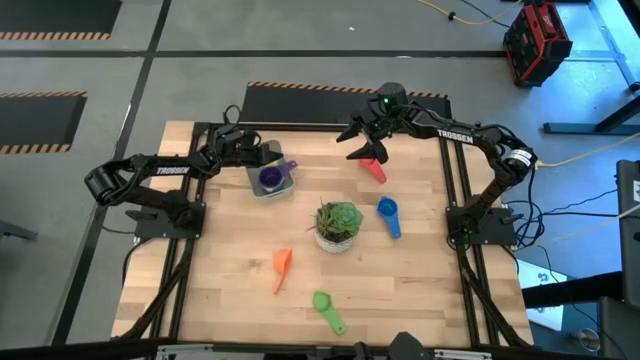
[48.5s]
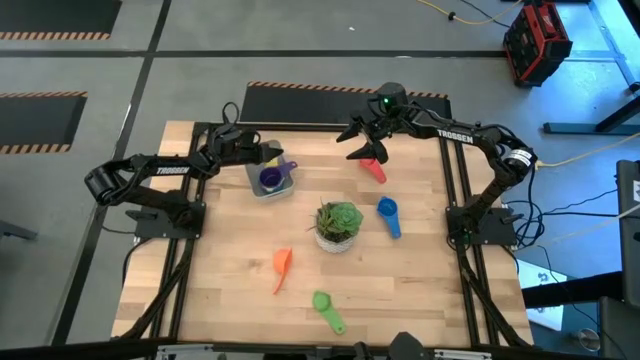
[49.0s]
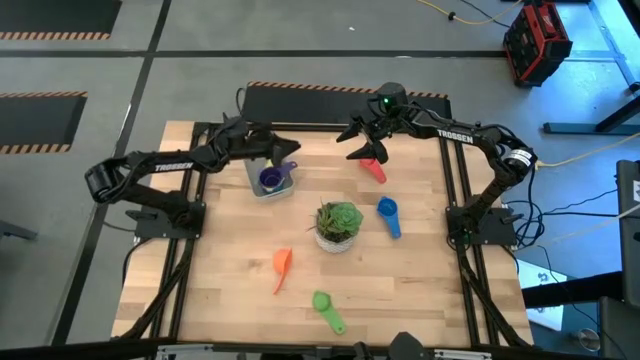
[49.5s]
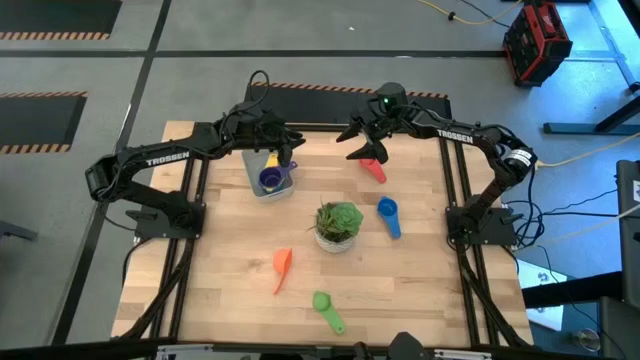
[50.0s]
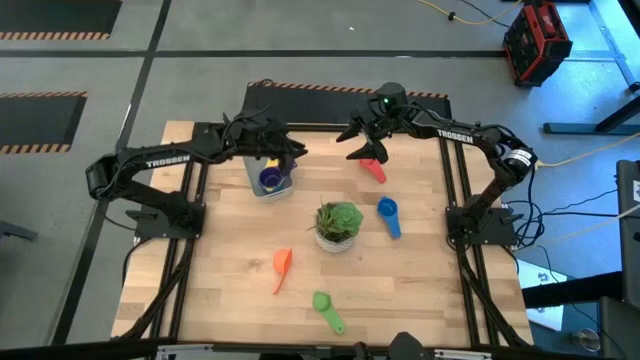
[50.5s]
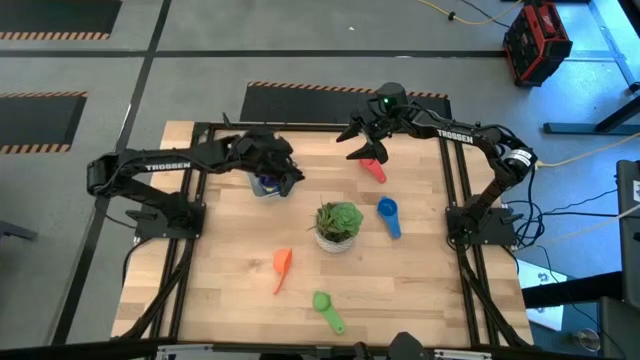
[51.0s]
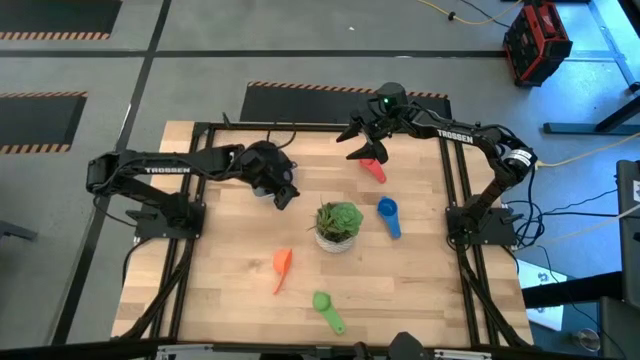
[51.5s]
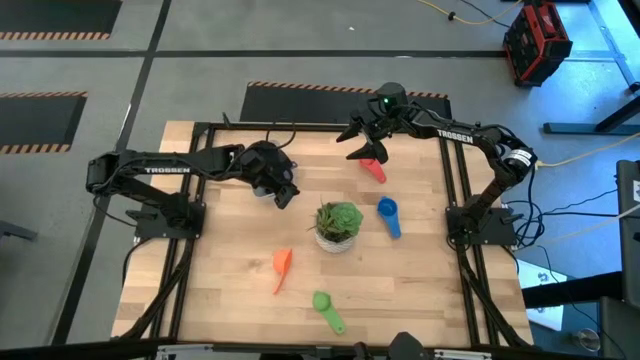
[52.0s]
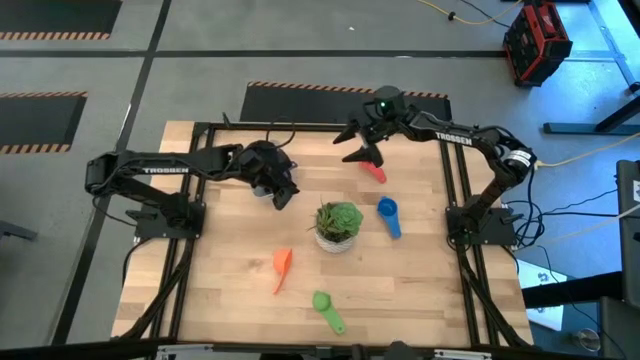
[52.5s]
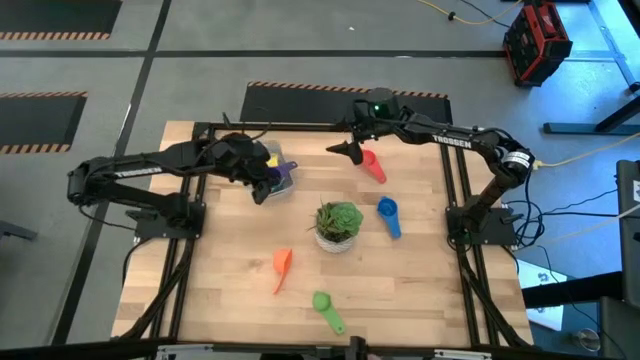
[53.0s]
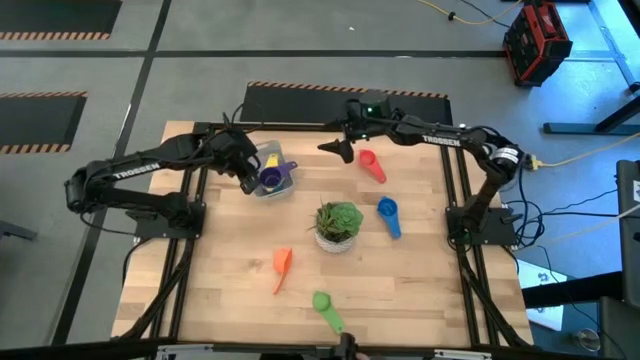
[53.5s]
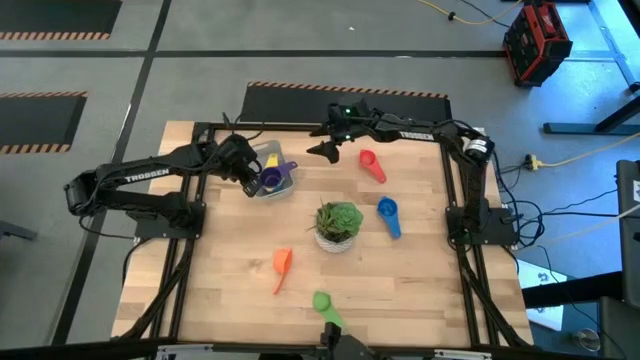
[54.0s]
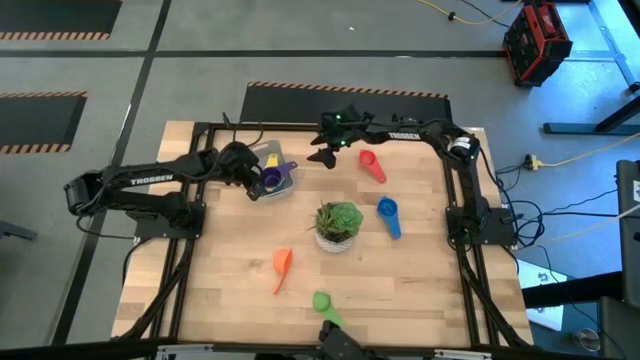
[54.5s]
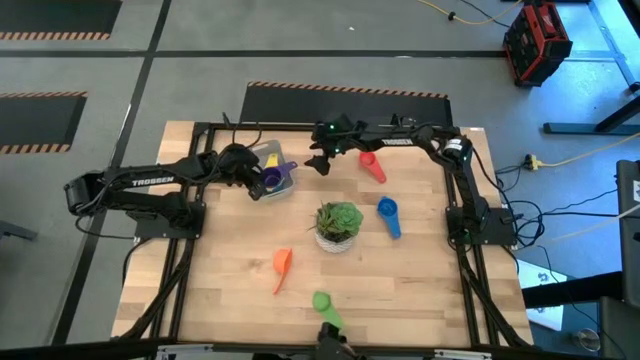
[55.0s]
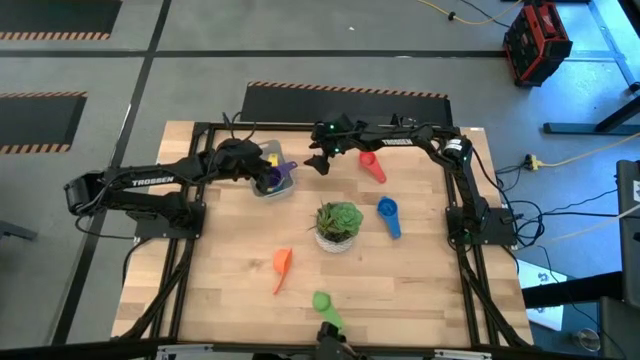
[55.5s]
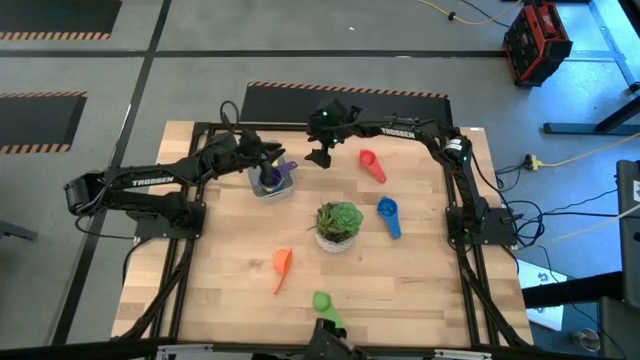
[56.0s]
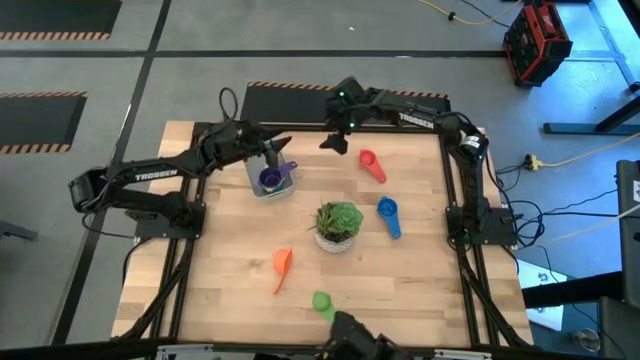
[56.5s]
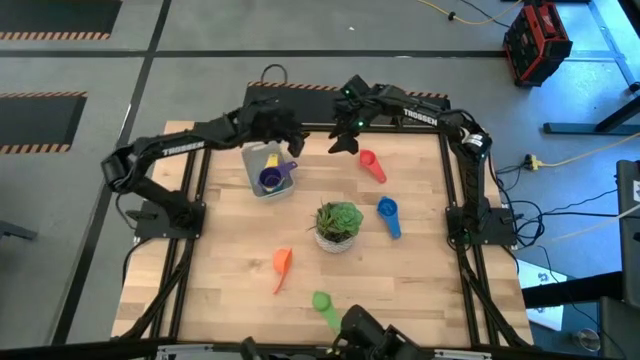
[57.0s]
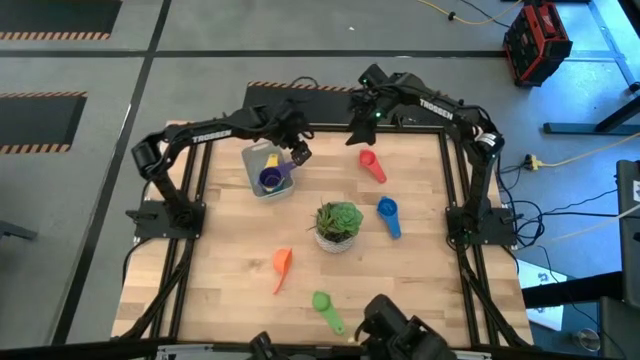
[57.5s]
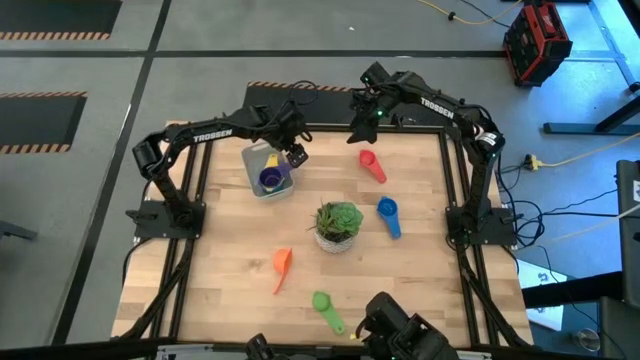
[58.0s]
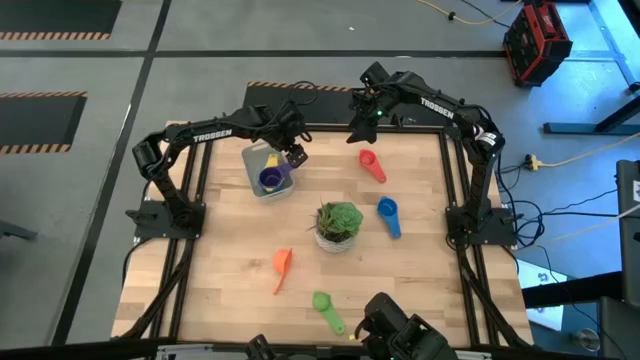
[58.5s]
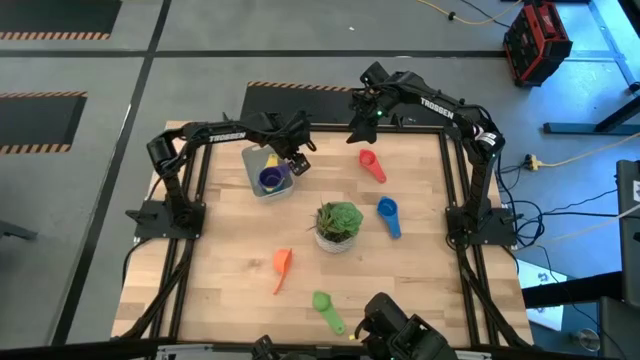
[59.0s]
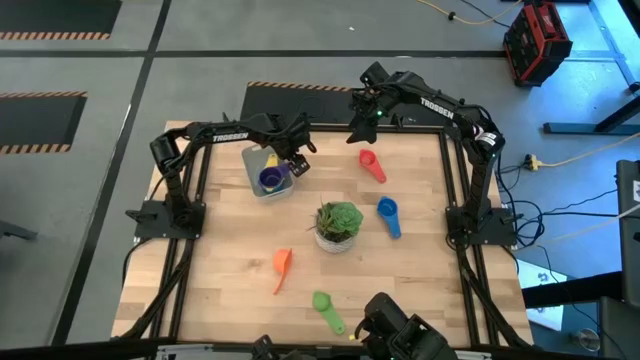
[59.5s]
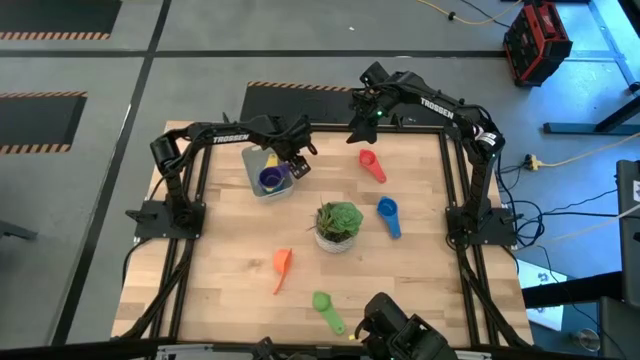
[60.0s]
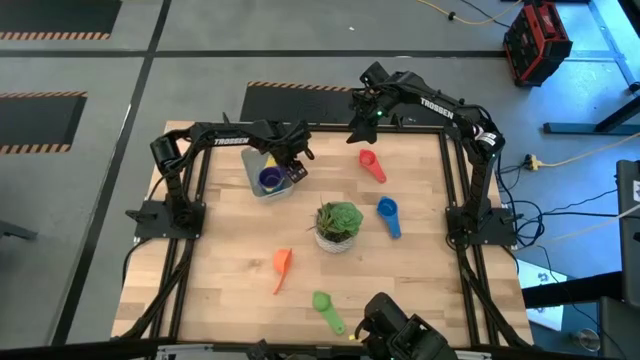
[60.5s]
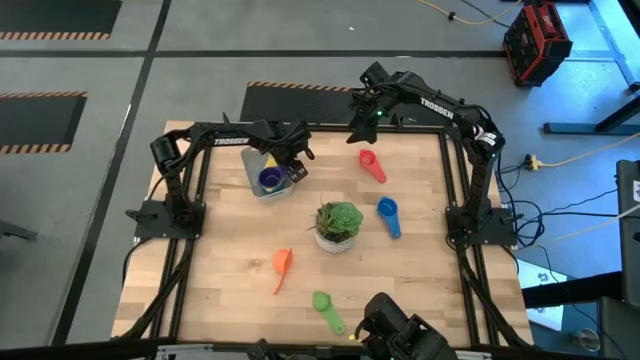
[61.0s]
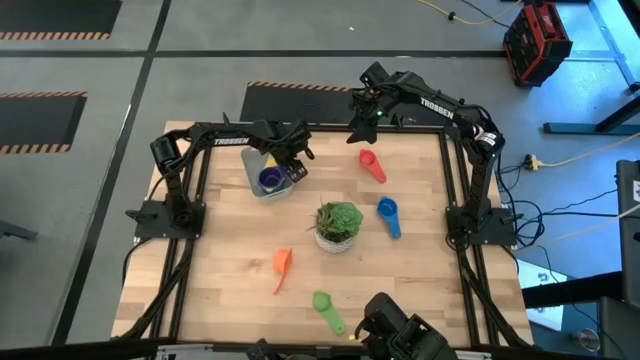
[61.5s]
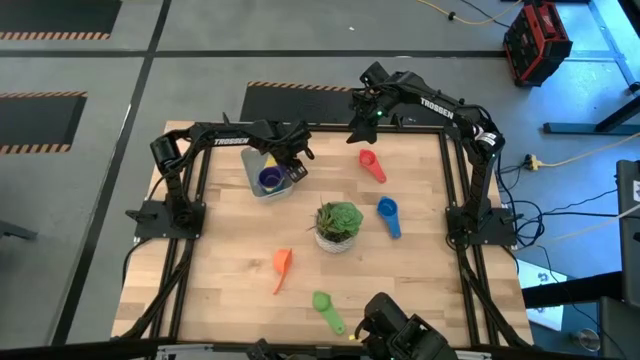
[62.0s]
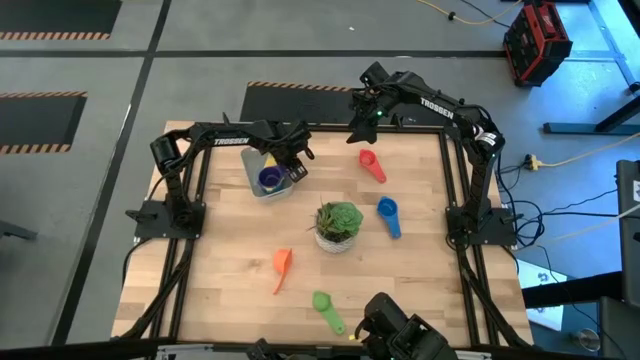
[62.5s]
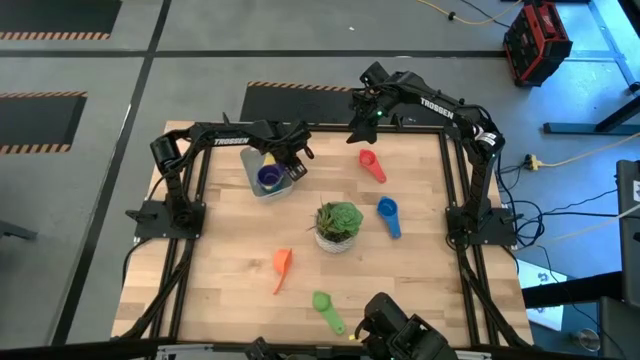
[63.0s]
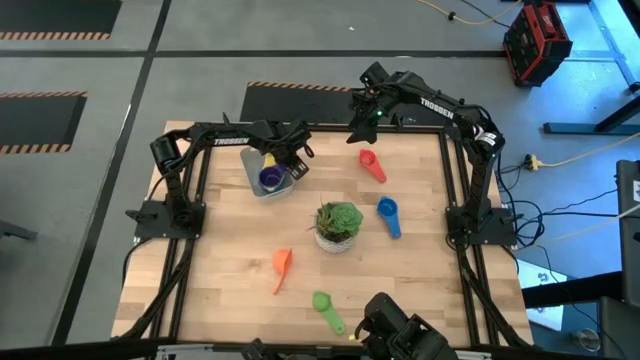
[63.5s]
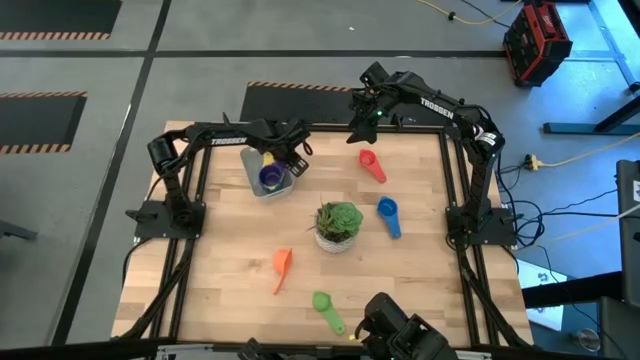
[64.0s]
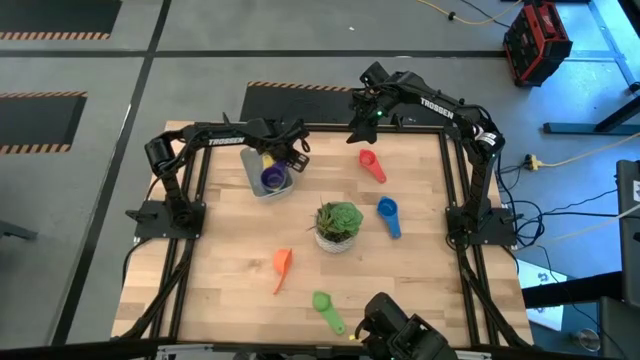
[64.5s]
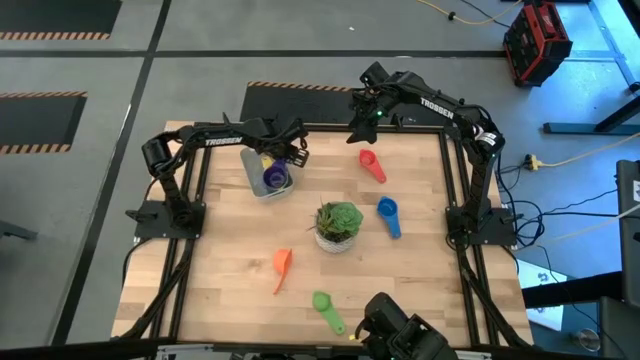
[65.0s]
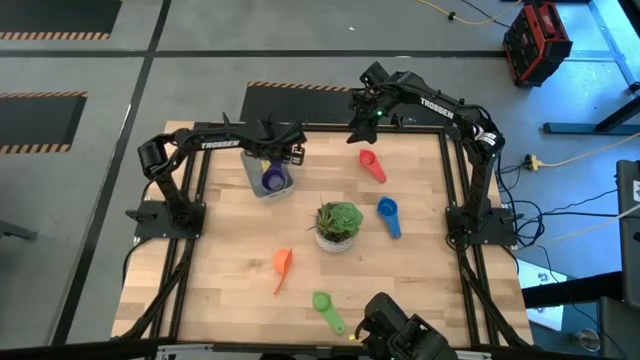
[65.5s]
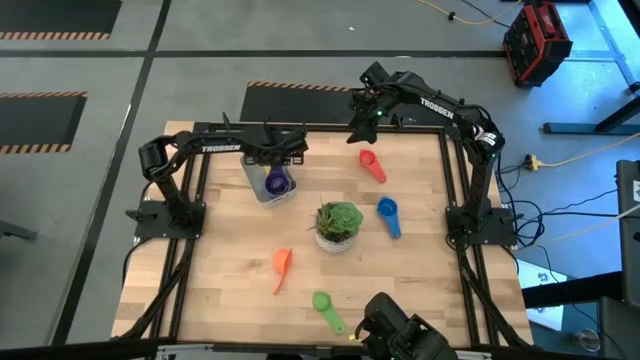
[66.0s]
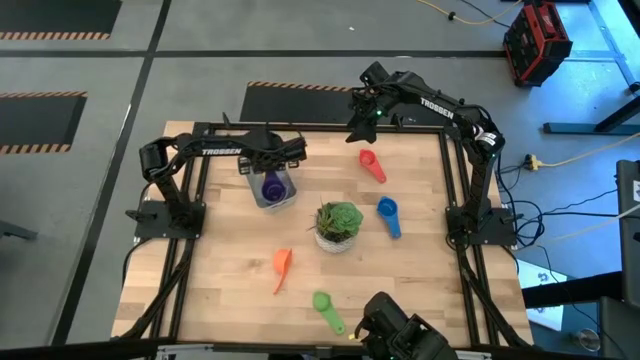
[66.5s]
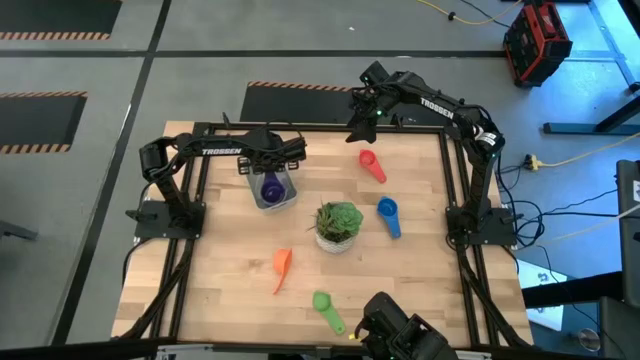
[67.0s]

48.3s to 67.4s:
Task: Nest measuring cups in basket
Stack the violet measuring cup on top of the yellow measuring cup in the gray bin
